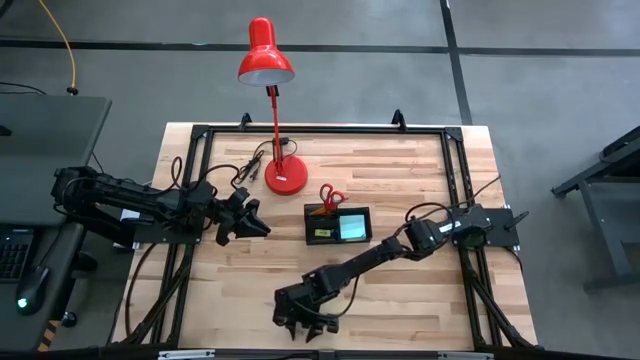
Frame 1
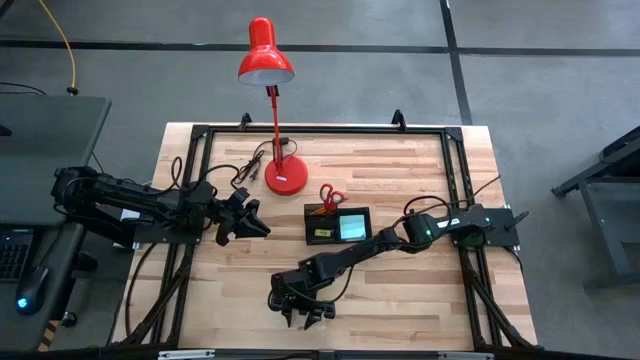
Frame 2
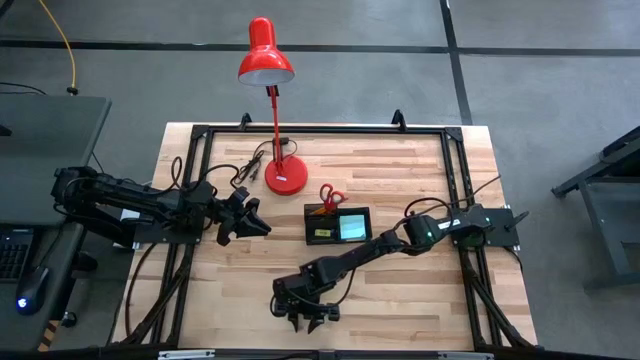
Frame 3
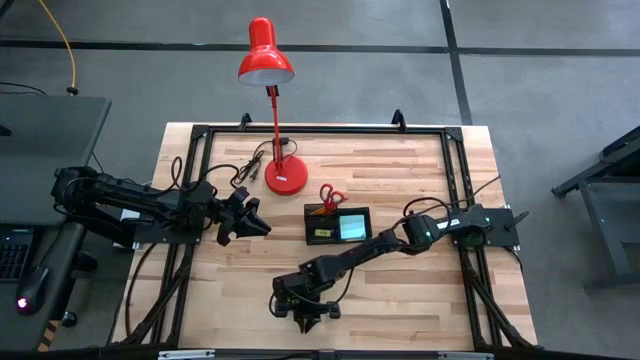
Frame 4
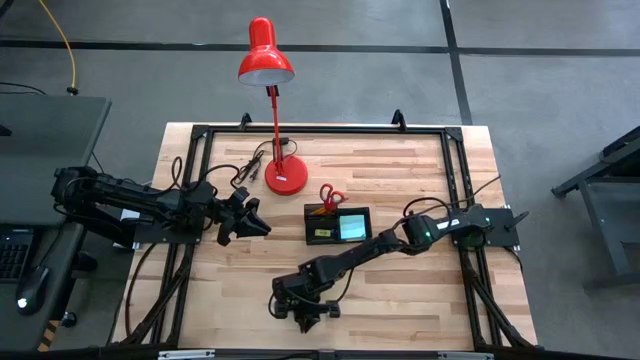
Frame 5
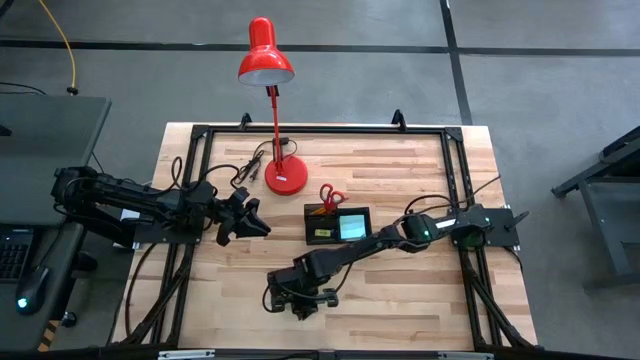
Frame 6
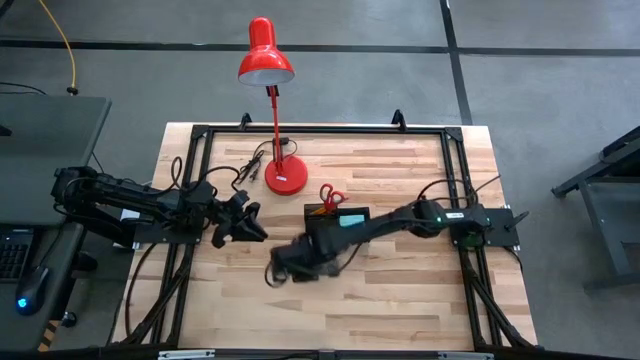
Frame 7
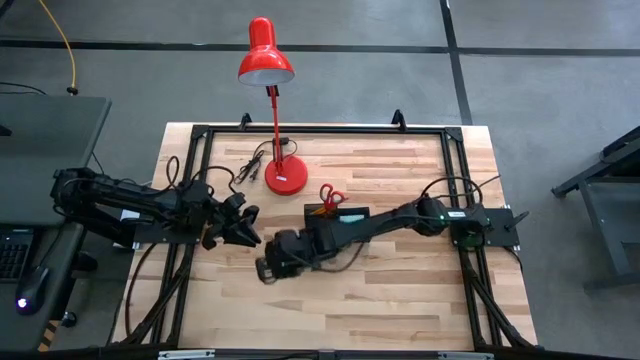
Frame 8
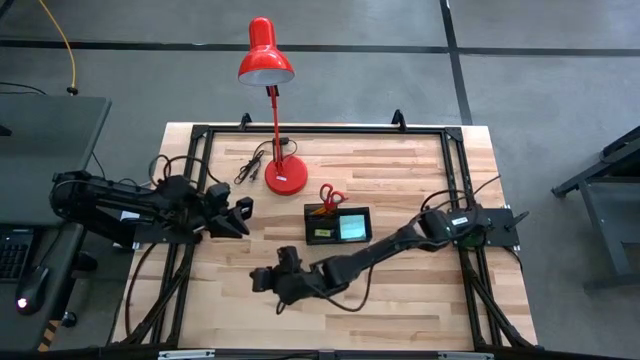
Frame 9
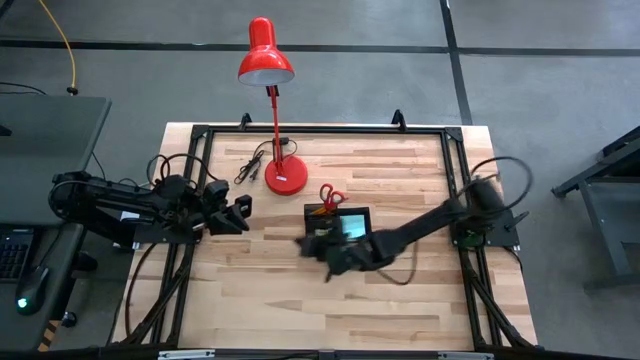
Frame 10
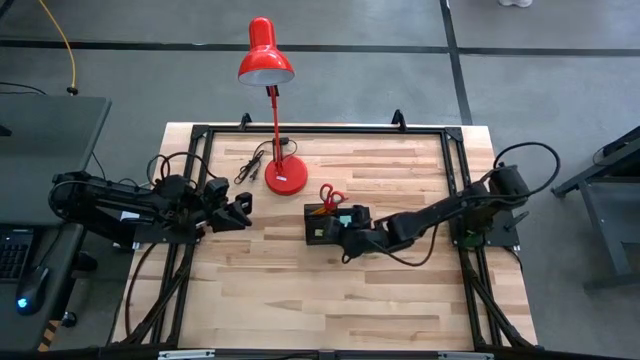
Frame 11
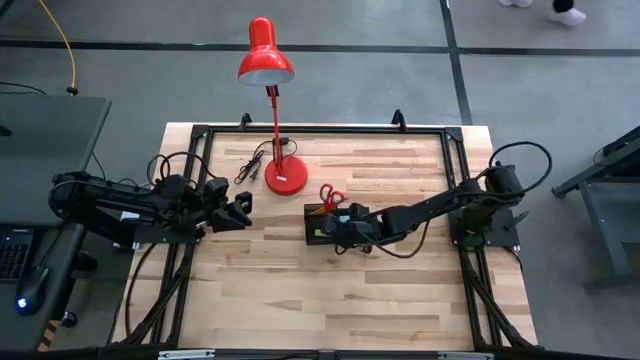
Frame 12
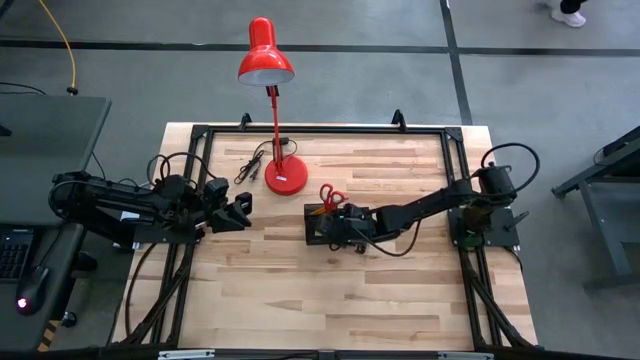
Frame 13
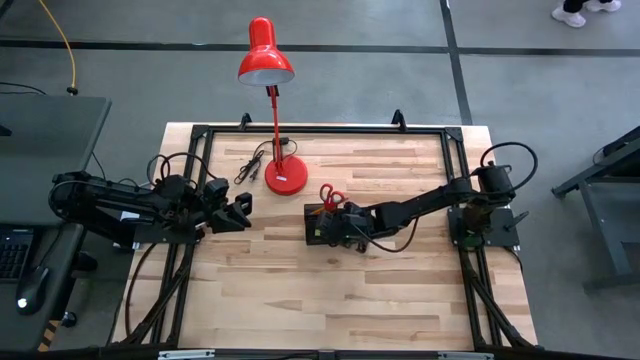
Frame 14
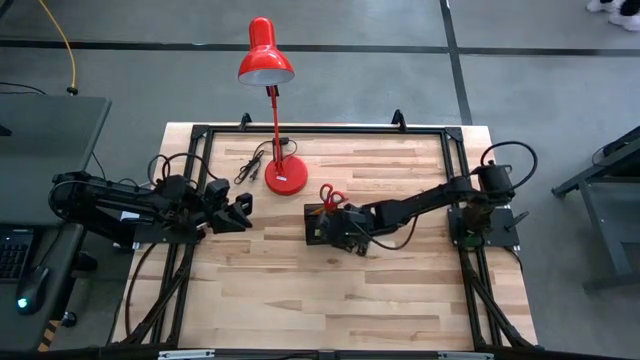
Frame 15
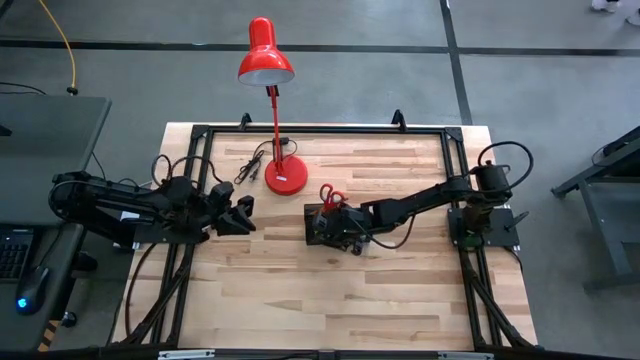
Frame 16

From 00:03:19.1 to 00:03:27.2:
Task: Pick and place office supplies into organizer
Put the pink binder clip into the black desk organizer

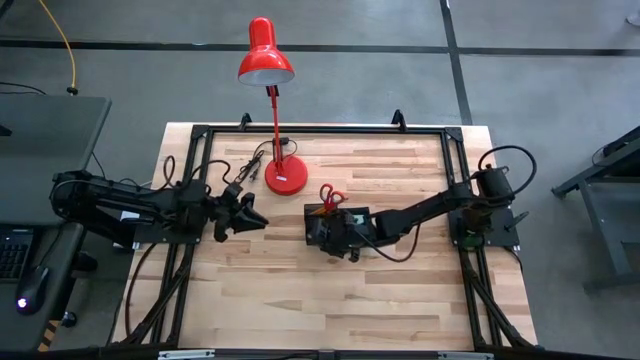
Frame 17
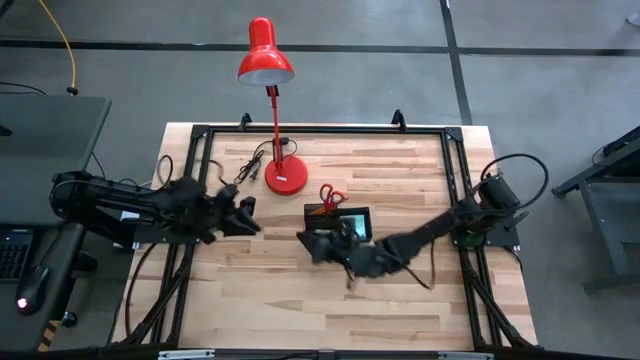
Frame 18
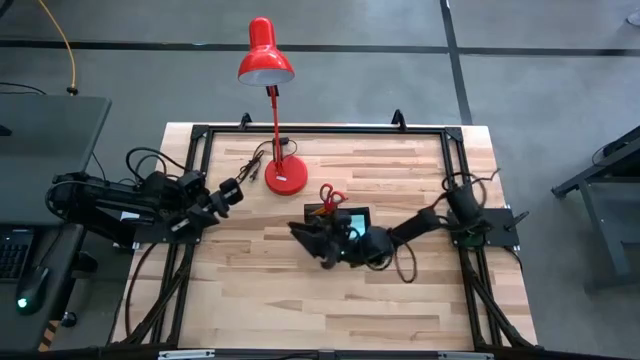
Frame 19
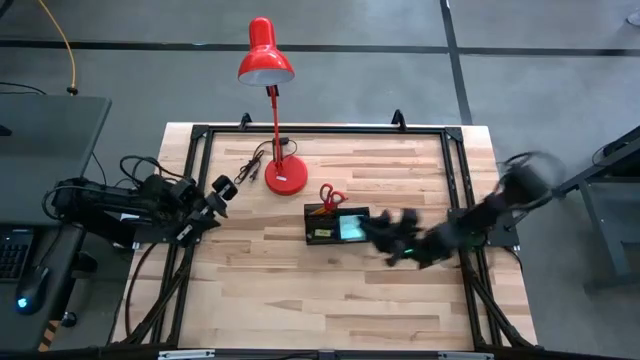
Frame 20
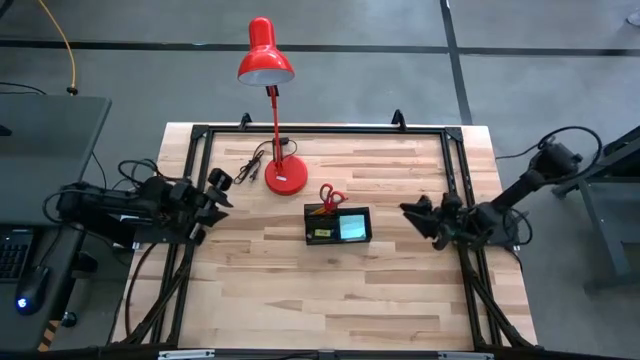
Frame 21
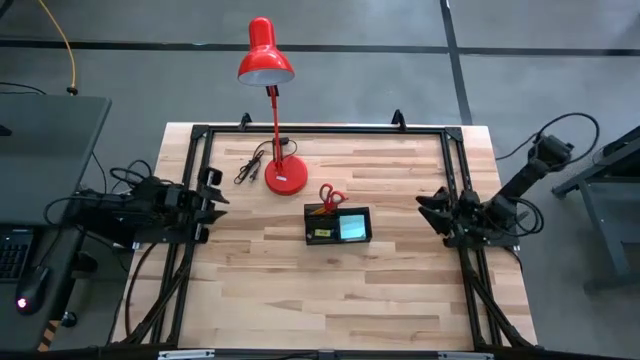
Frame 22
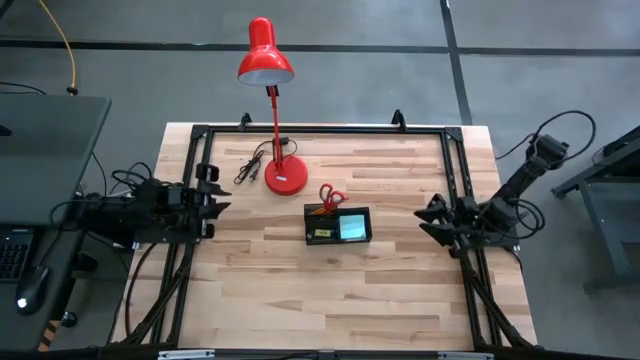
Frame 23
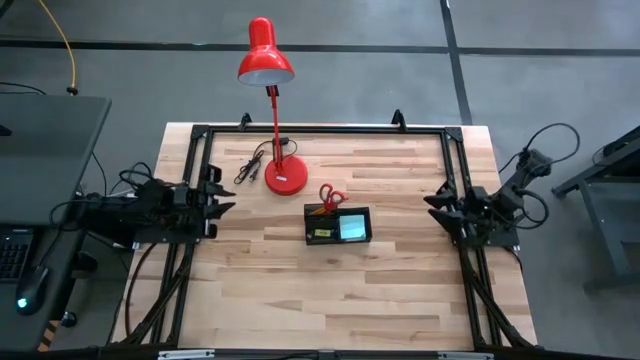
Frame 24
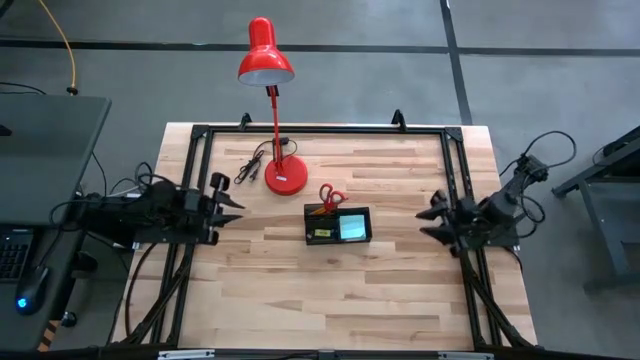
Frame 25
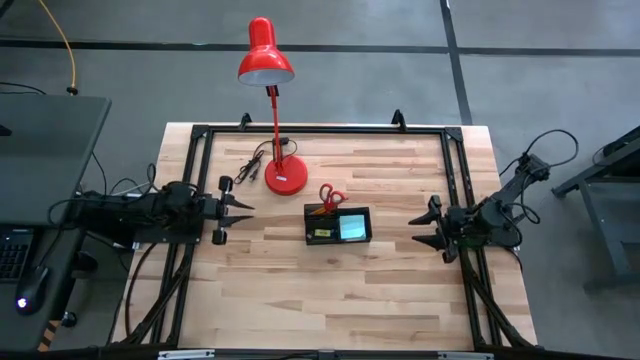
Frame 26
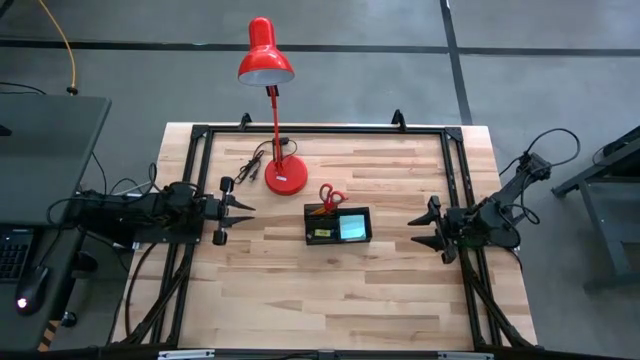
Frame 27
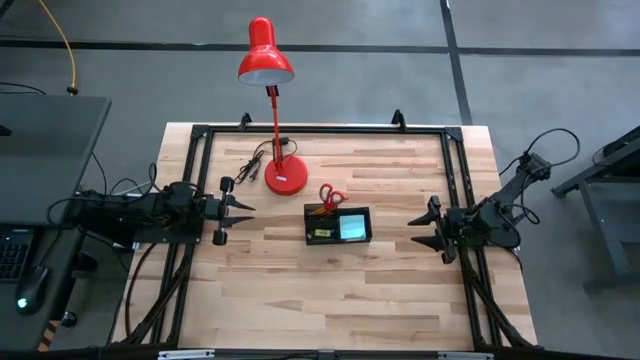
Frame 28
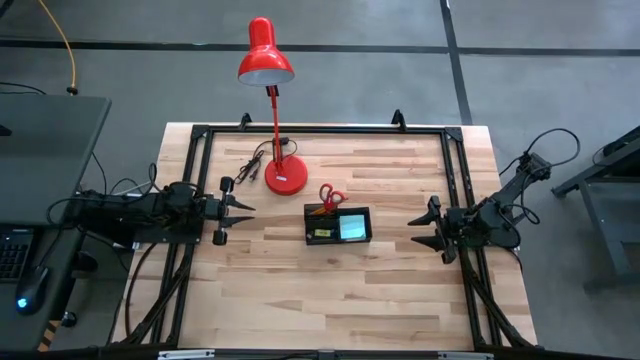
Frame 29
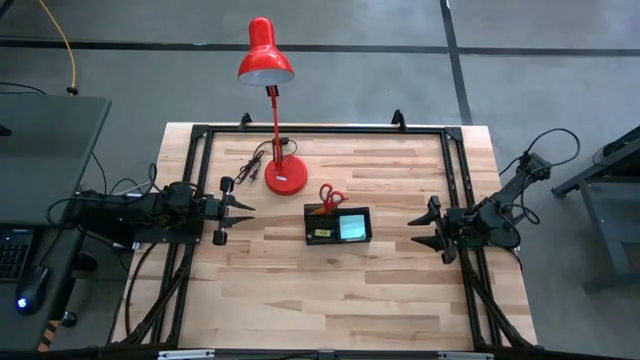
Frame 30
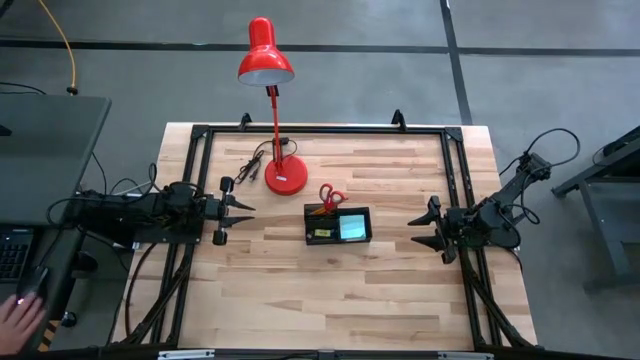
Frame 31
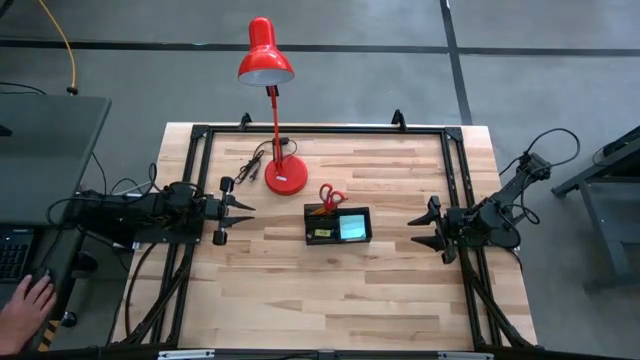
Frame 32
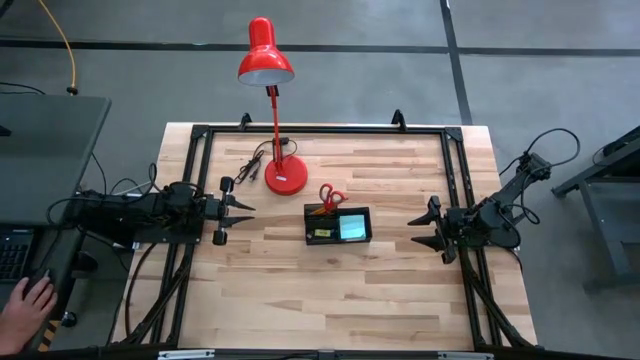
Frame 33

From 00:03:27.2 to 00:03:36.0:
Return to Home Position

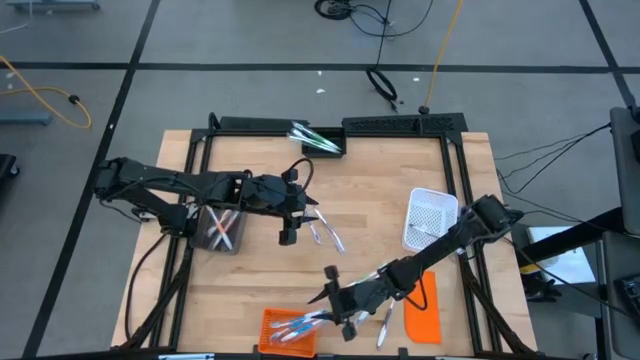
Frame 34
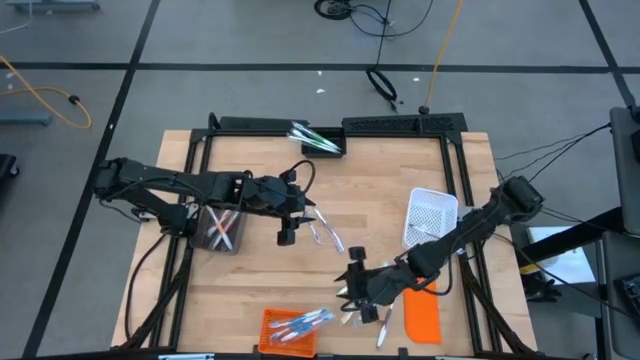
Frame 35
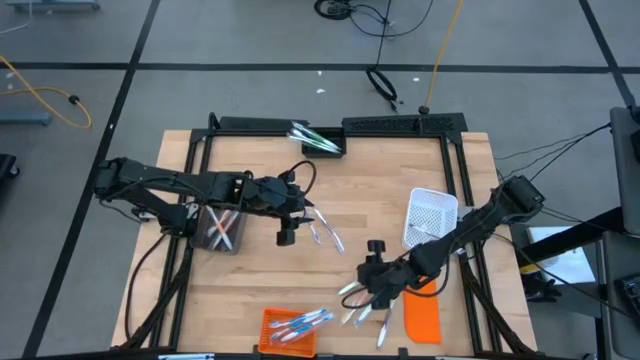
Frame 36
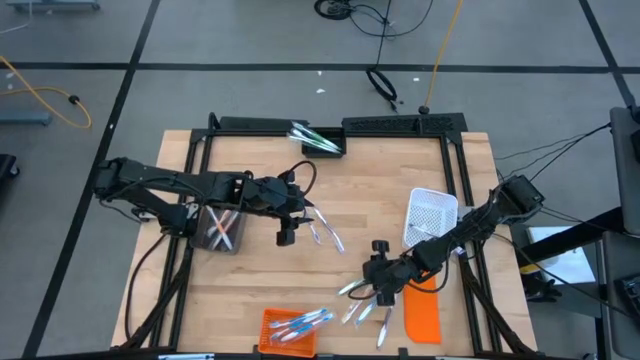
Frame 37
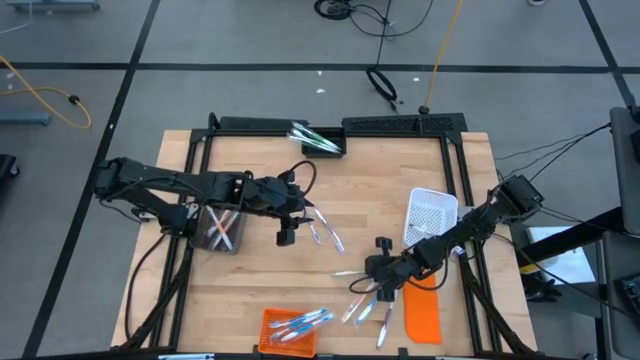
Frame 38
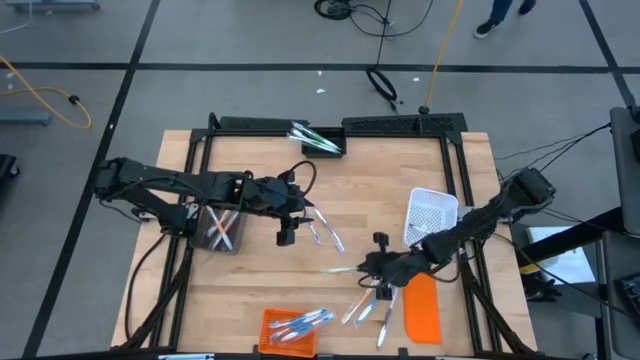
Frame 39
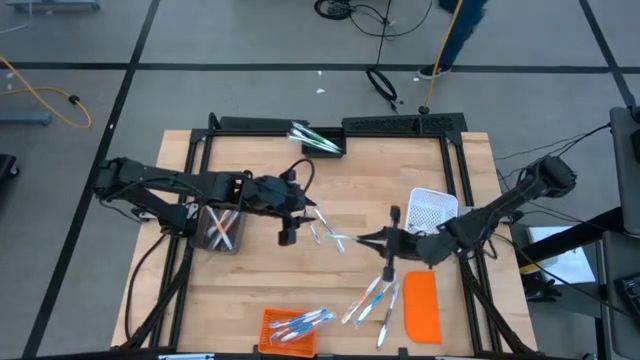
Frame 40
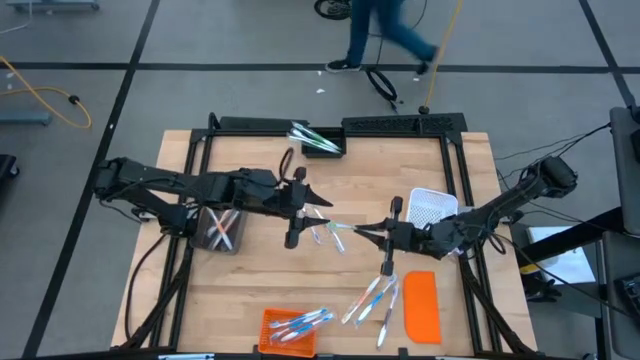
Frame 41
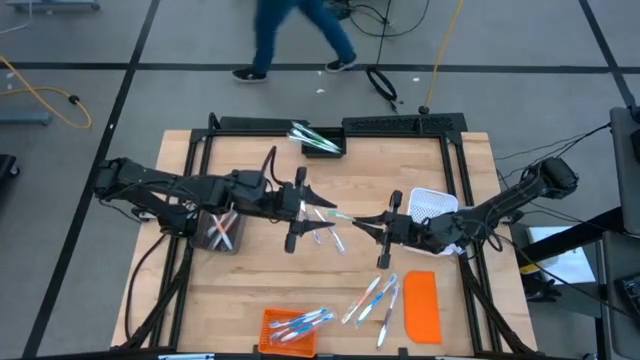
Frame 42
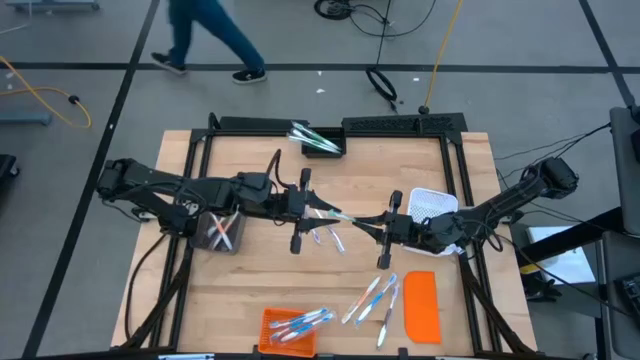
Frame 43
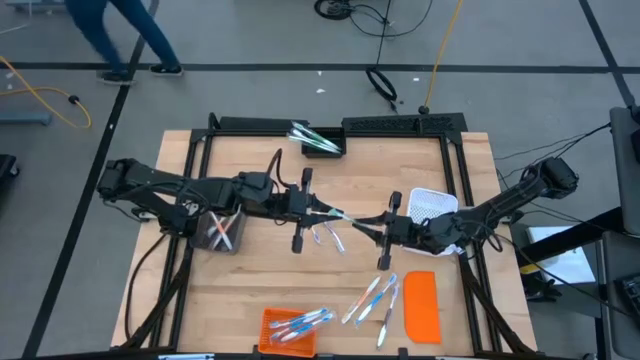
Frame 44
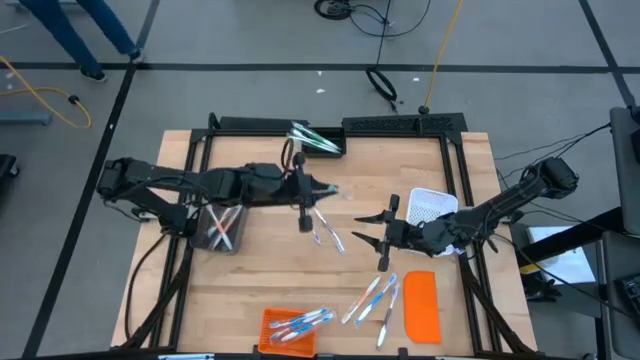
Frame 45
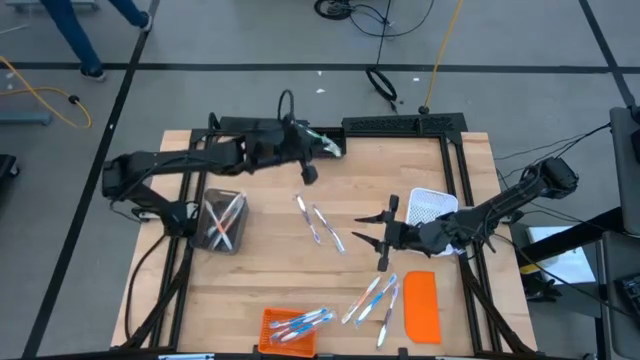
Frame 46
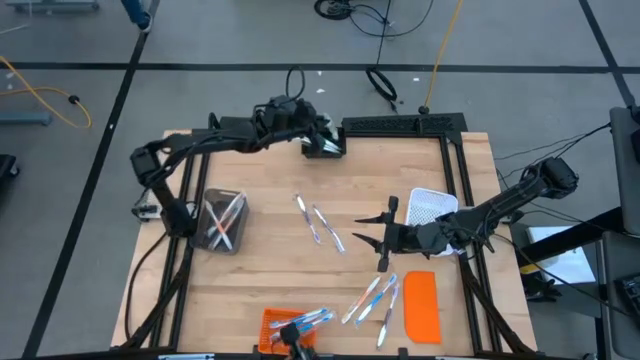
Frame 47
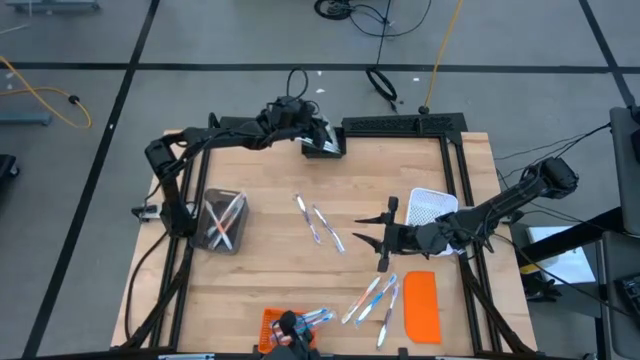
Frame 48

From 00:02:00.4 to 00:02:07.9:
Task: Pick & Place Toothbrushes
Put the green toothbrush into the black bin
